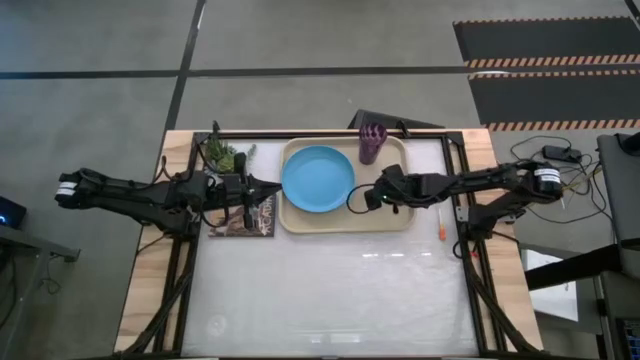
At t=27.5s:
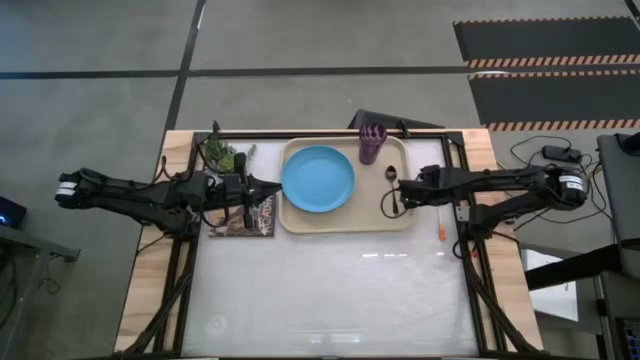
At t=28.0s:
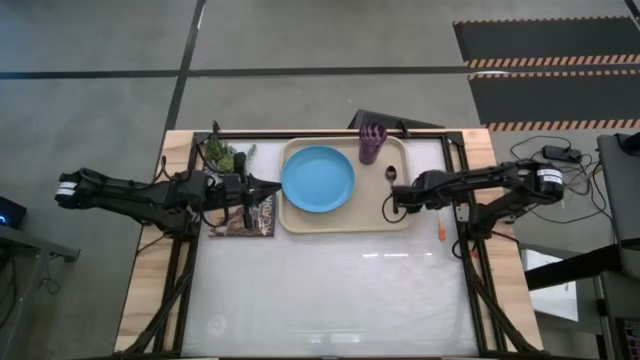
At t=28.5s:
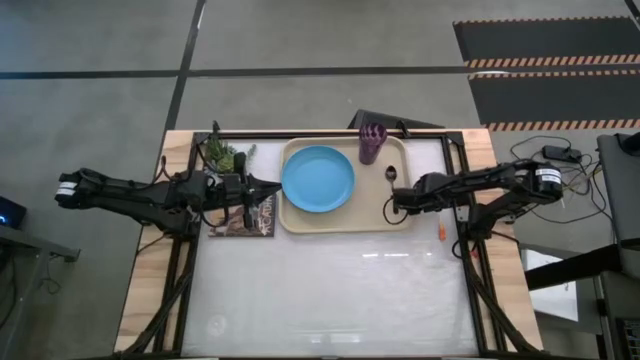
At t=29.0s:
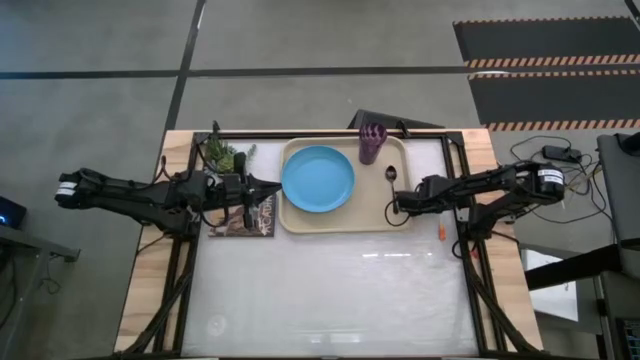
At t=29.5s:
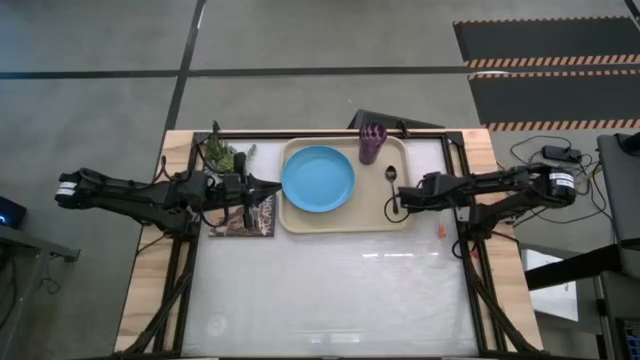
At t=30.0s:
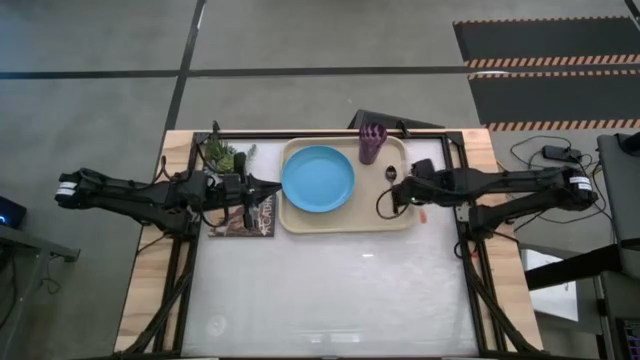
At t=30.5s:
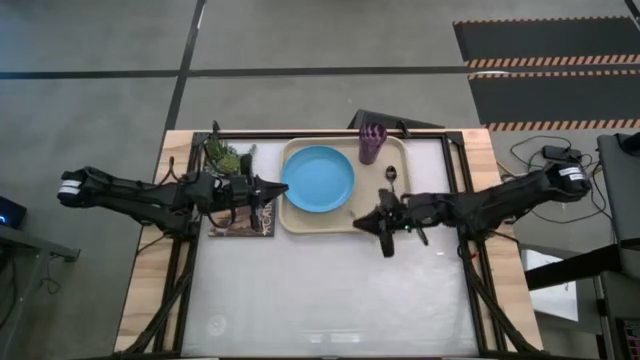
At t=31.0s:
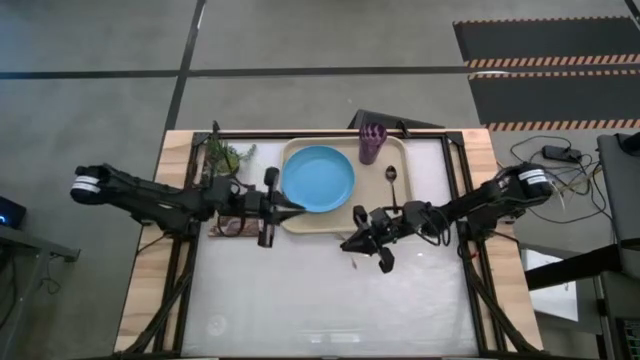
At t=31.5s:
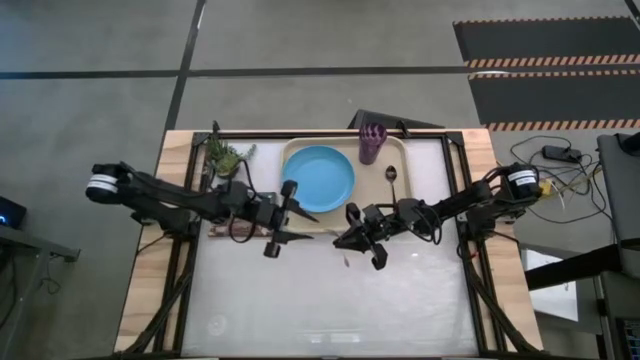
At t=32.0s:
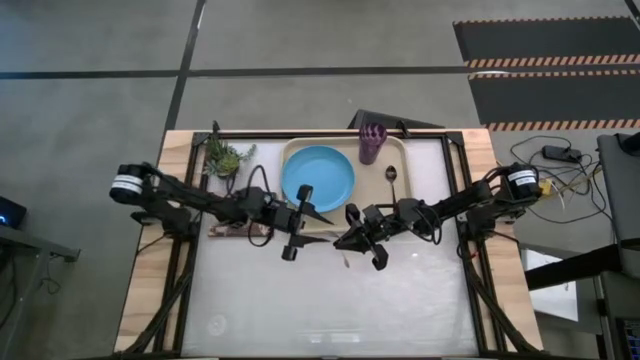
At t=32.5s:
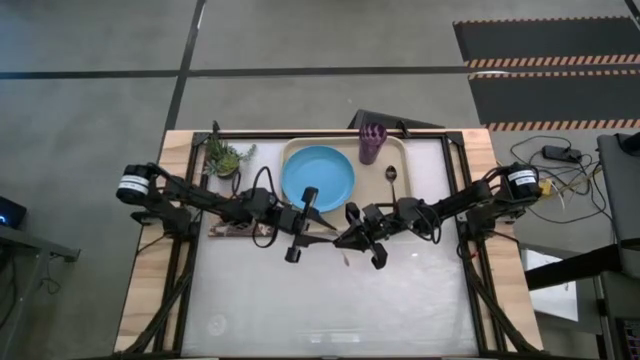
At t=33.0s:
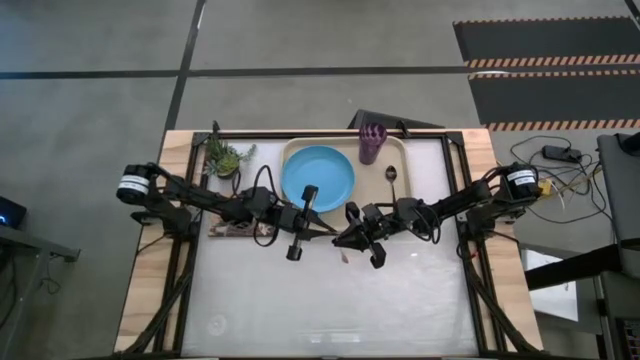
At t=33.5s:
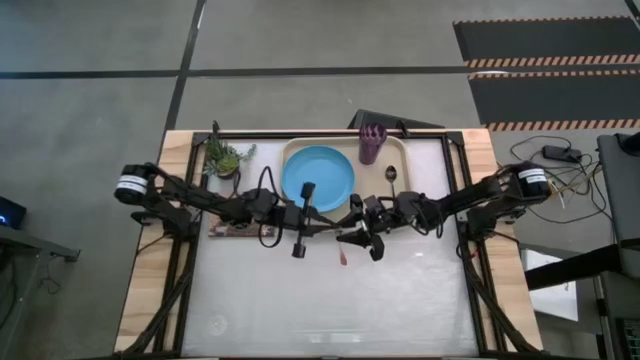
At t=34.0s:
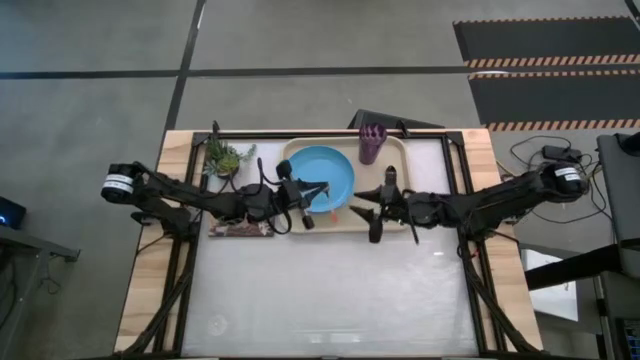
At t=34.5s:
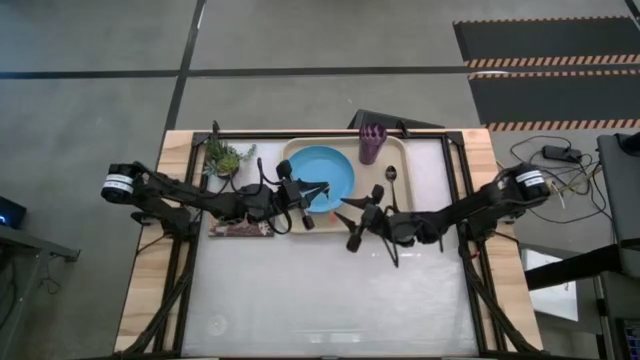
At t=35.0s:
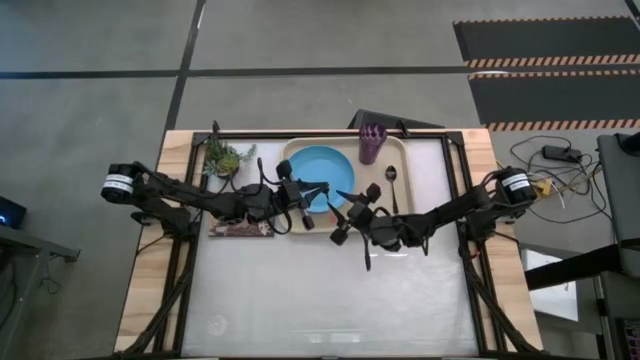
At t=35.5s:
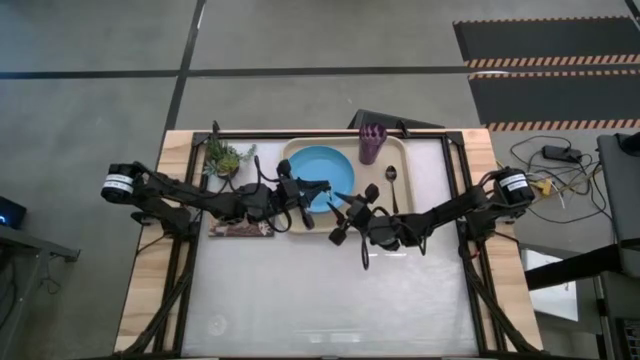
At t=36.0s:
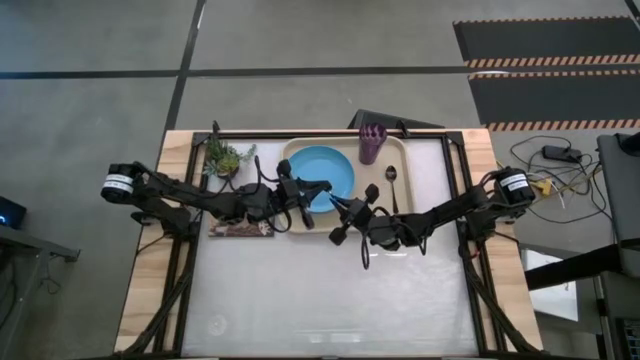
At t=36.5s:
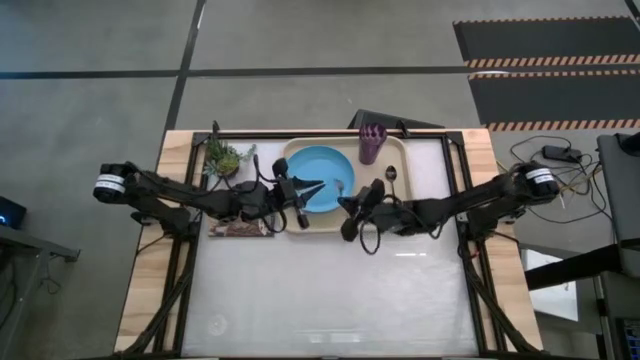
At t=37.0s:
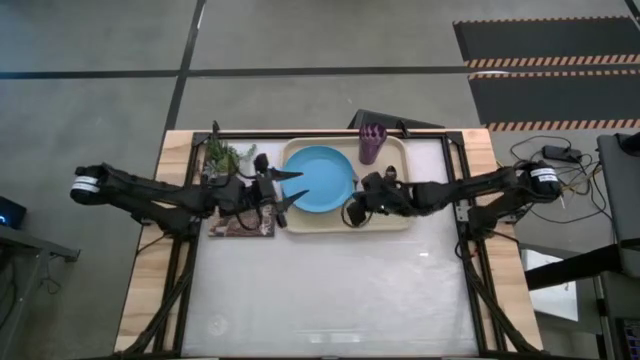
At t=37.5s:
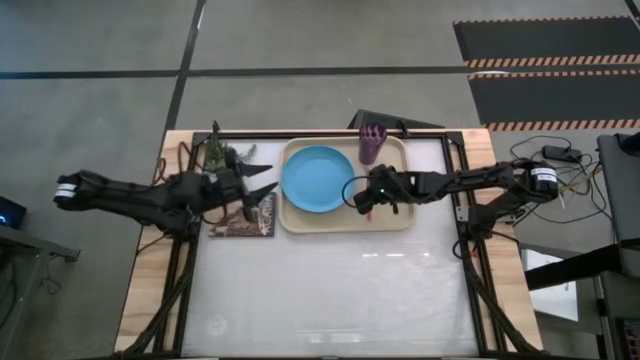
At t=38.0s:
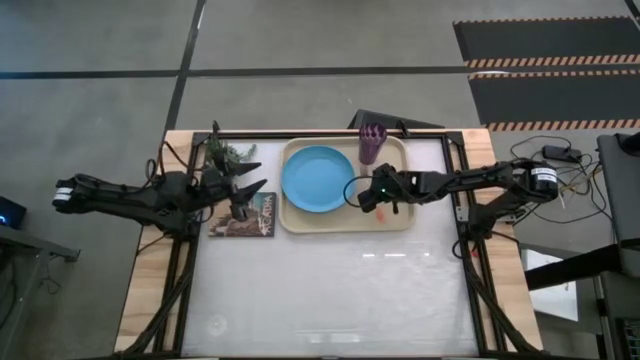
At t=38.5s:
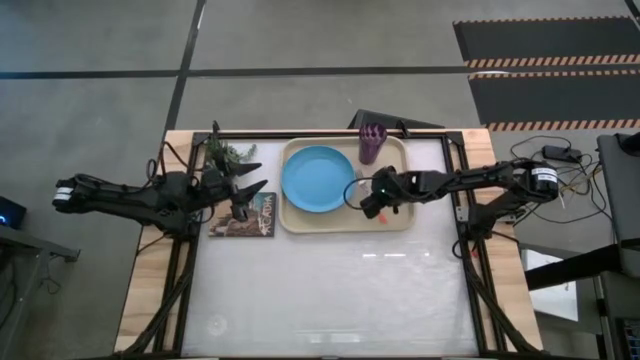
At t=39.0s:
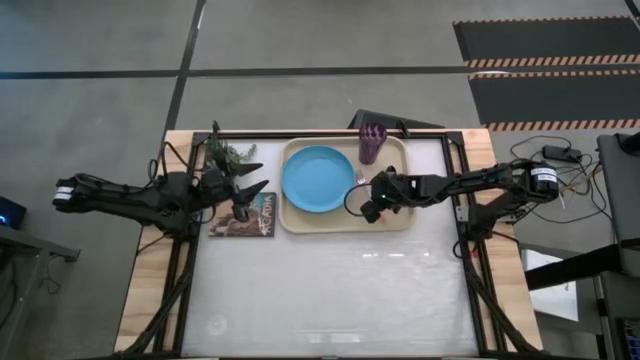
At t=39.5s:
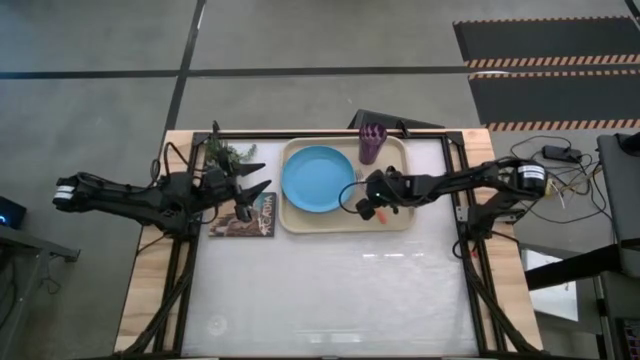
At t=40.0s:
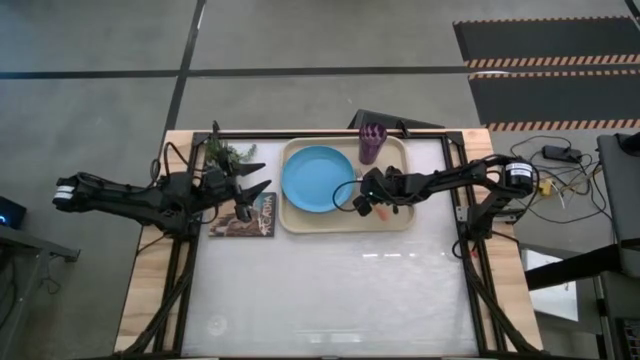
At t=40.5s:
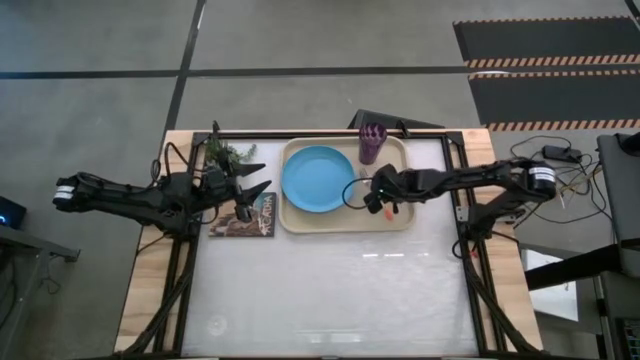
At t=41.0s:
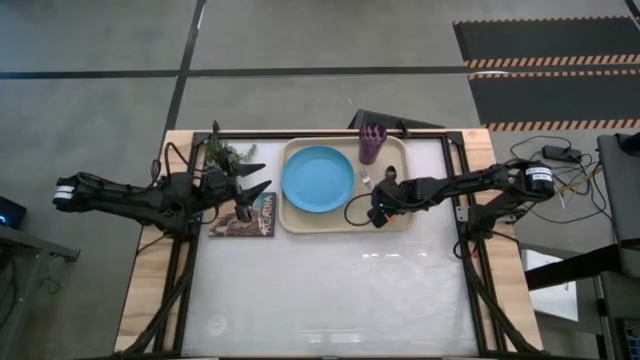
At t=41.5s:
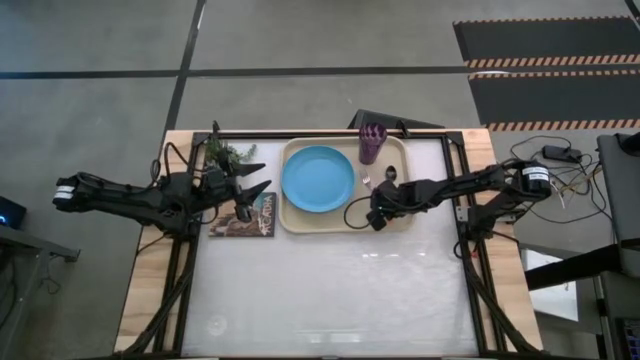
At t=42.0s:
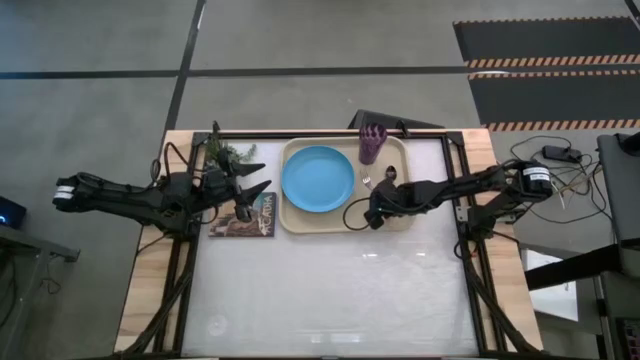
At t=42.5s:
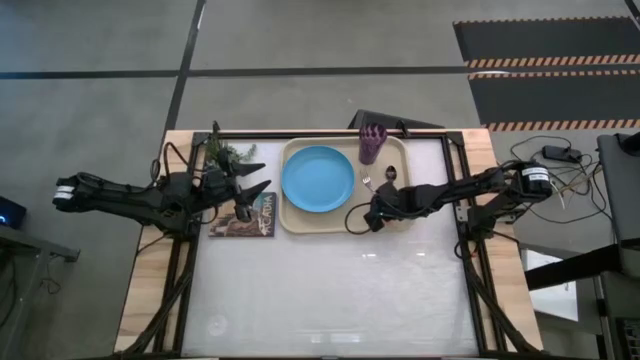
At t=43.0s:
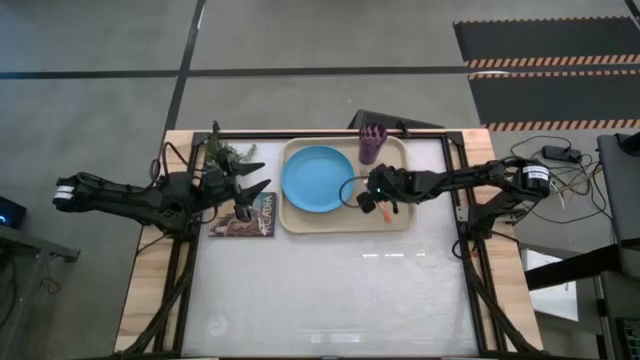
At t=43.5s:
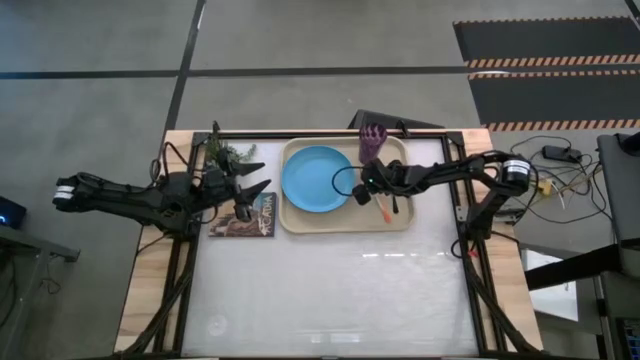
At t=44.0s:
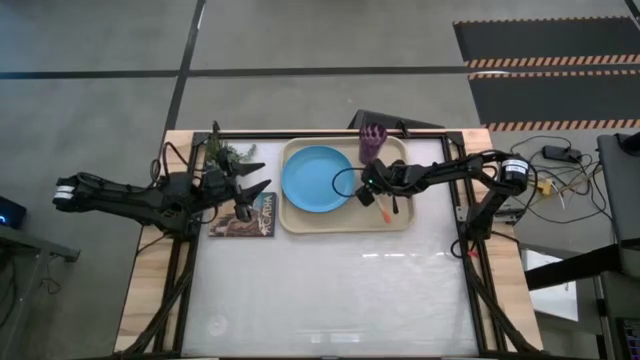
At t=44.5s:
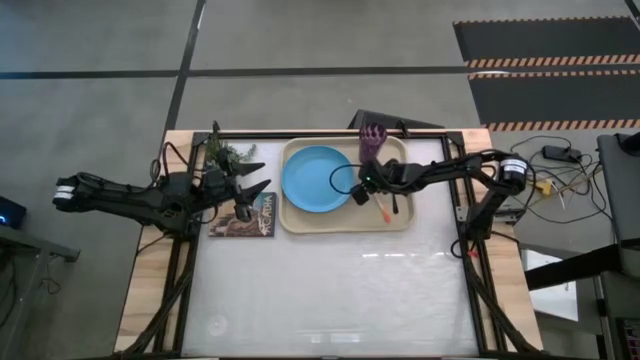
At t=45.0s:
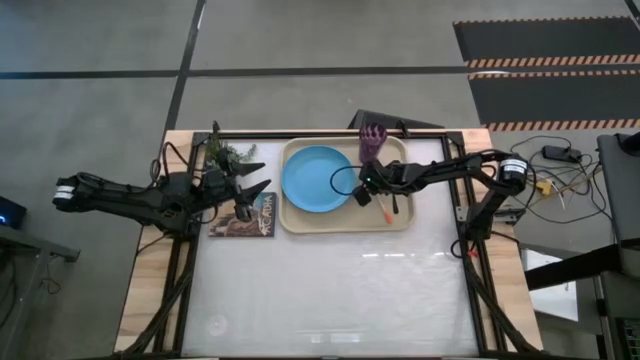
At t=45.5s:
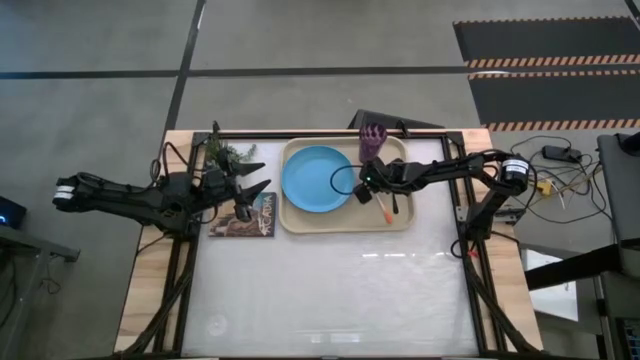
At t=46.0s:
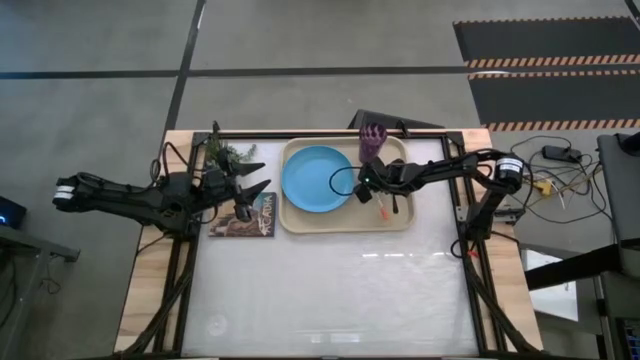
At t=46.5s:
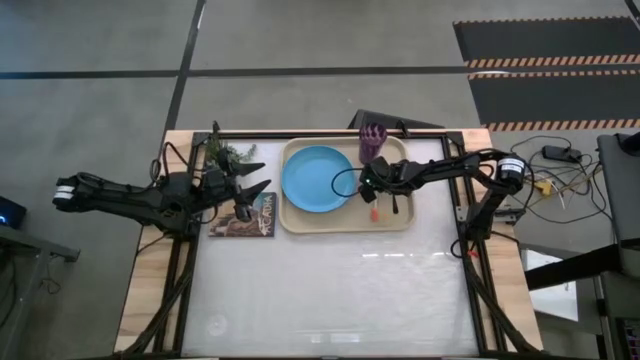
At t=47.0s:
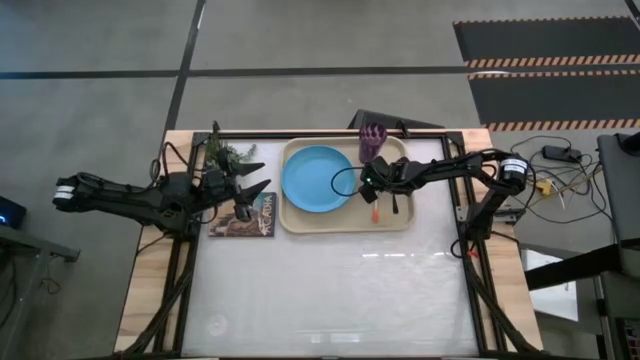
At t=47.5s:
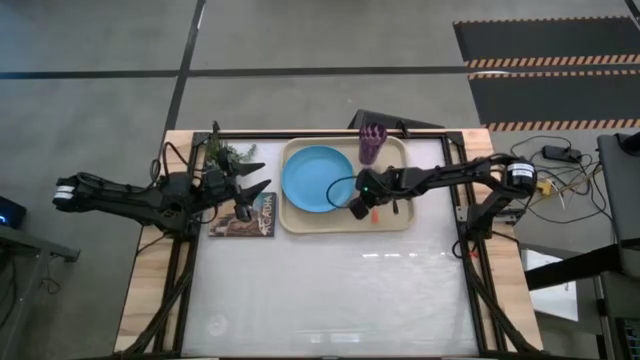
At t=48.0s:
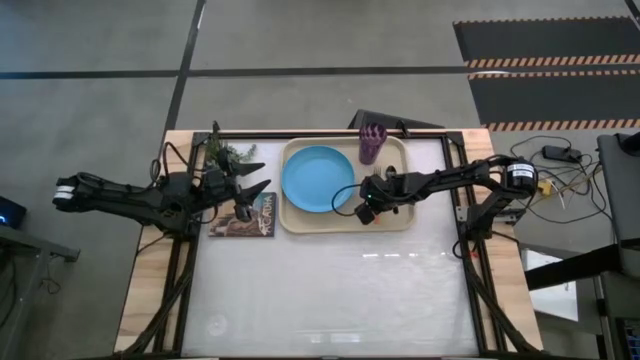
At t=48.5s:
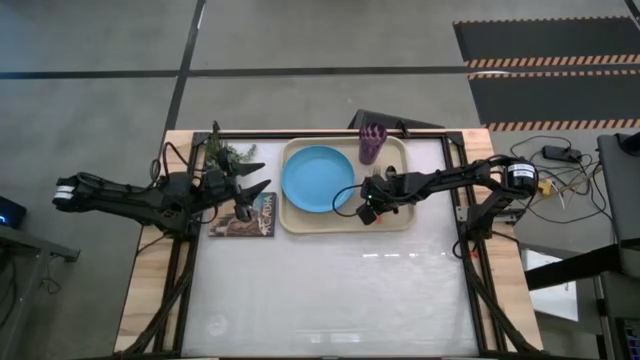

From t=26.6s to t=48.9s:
Task: Pick and place plate/cup/fork/spoon on tray
Put the orange fork to the left of the black spoon on the white tray

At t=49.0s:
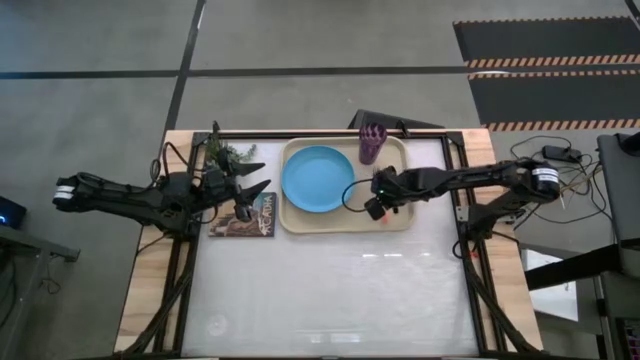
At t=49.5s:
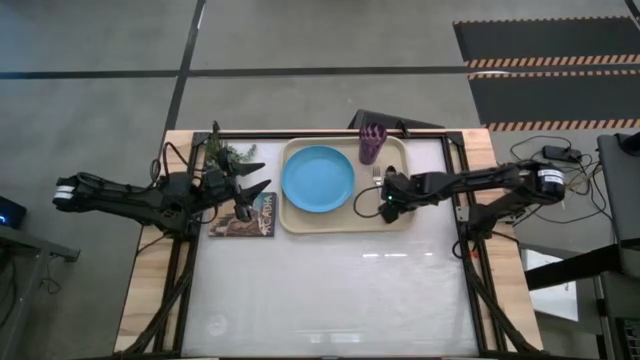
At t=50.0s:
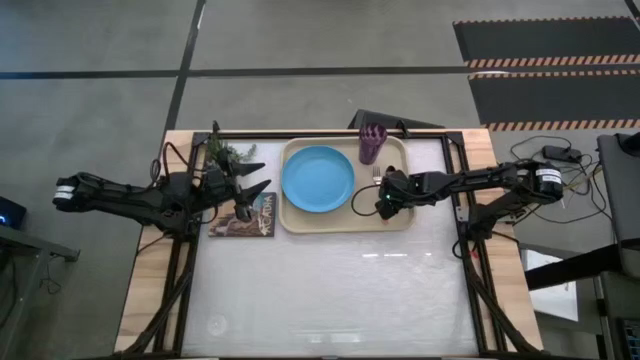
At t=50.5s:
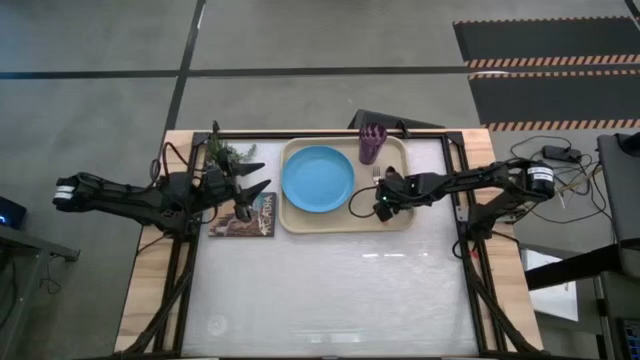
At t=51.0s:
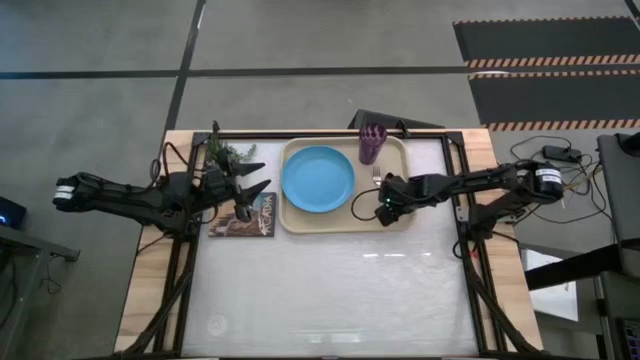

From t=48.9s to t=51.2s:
Adjust the black spoon on the white tray
